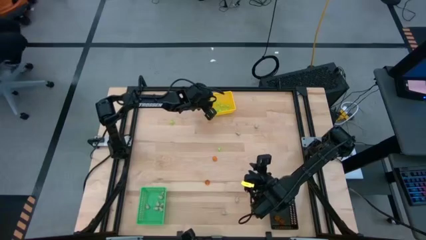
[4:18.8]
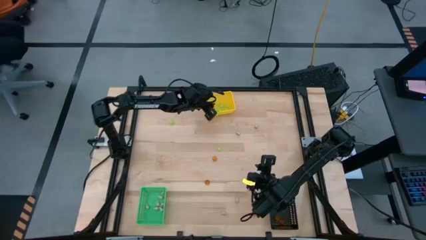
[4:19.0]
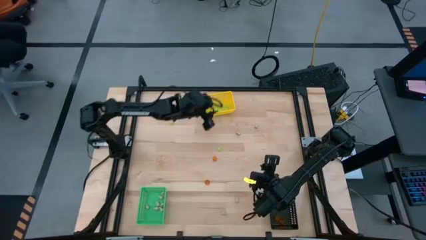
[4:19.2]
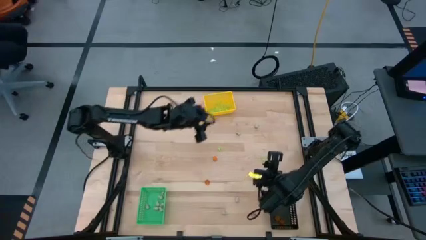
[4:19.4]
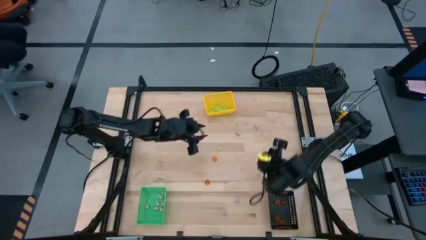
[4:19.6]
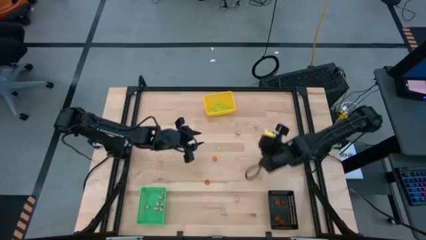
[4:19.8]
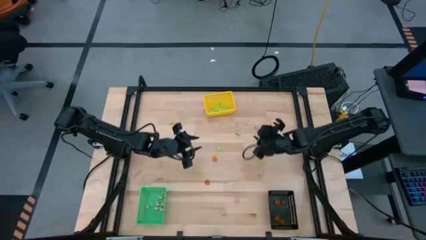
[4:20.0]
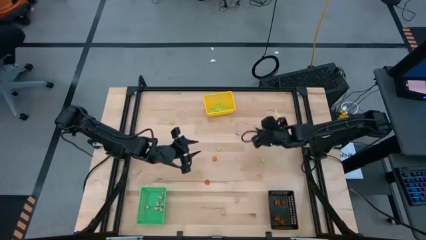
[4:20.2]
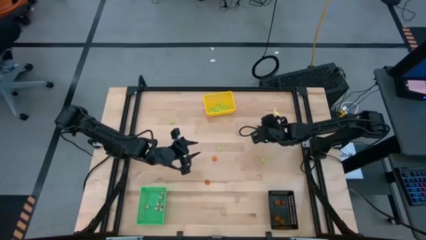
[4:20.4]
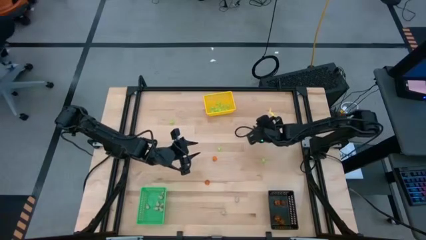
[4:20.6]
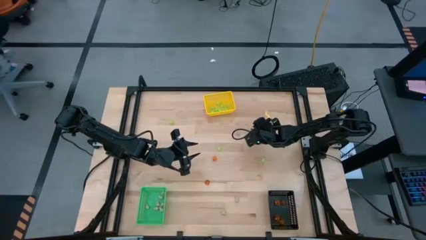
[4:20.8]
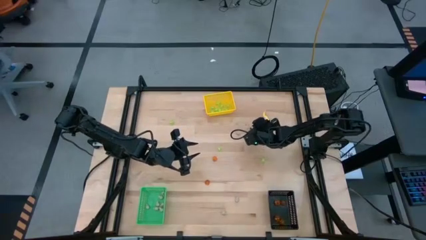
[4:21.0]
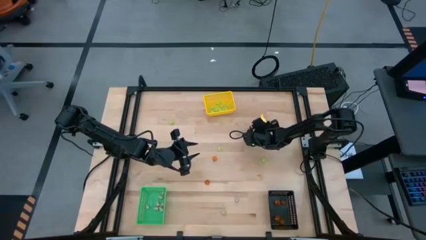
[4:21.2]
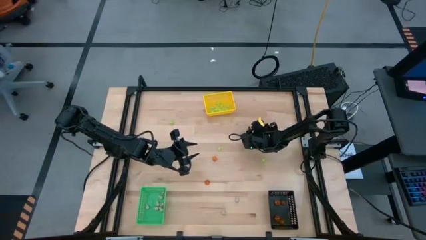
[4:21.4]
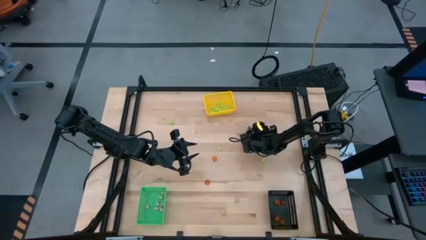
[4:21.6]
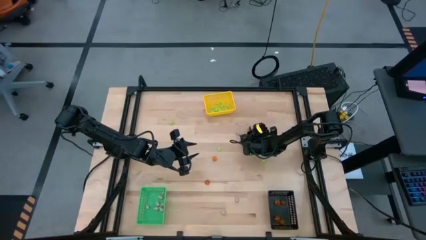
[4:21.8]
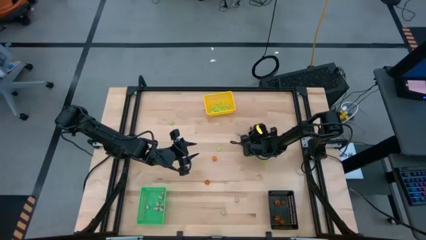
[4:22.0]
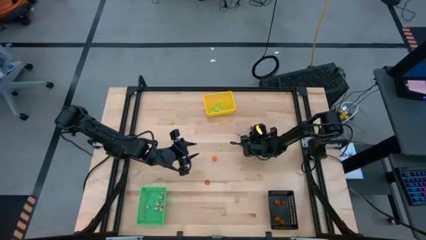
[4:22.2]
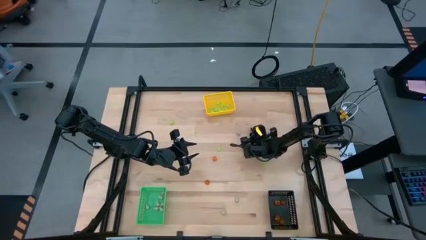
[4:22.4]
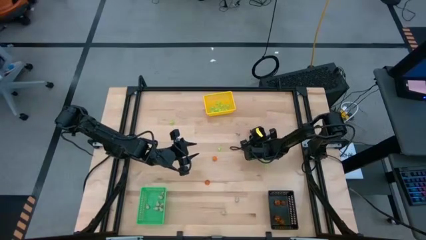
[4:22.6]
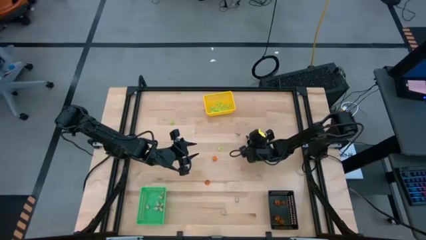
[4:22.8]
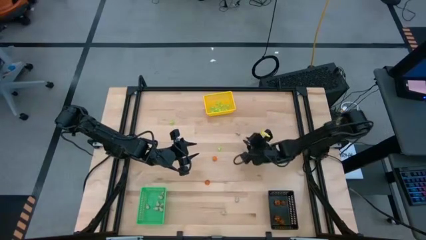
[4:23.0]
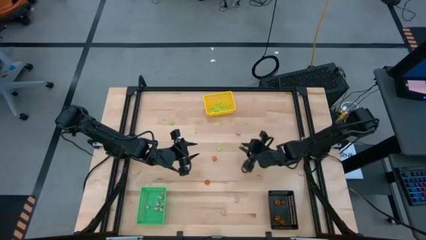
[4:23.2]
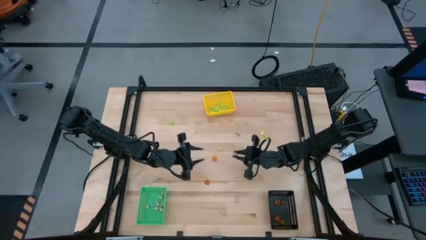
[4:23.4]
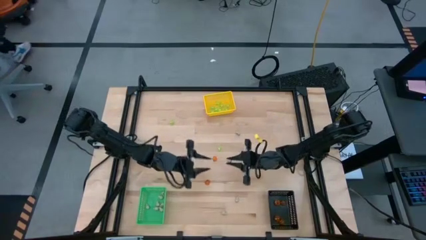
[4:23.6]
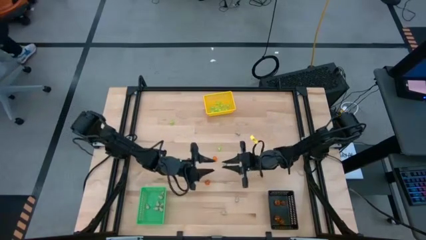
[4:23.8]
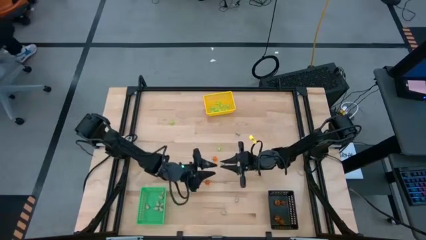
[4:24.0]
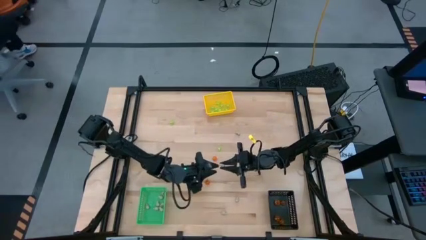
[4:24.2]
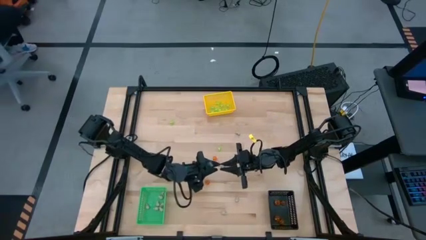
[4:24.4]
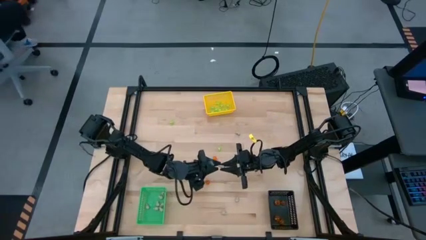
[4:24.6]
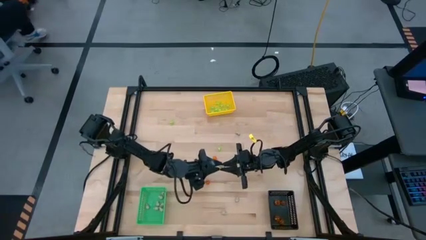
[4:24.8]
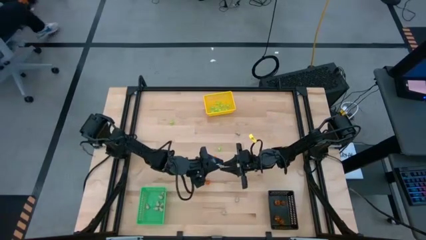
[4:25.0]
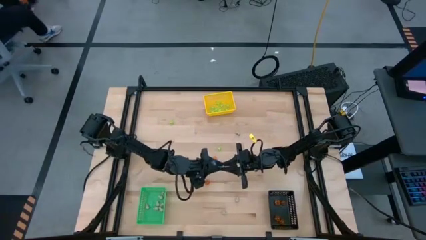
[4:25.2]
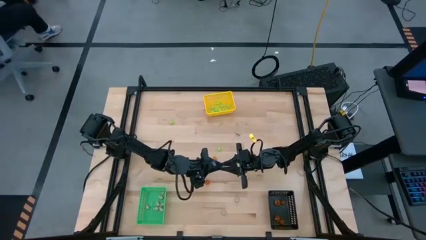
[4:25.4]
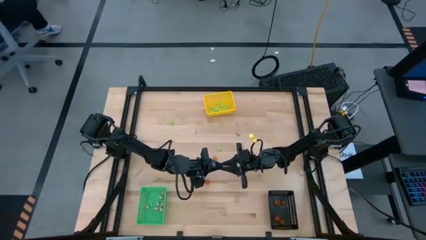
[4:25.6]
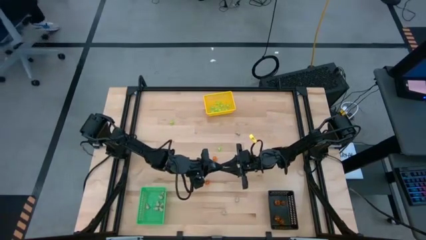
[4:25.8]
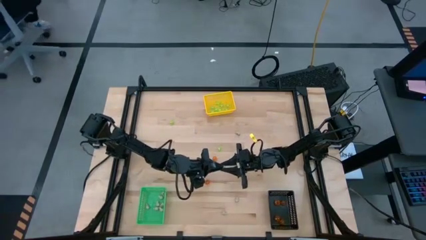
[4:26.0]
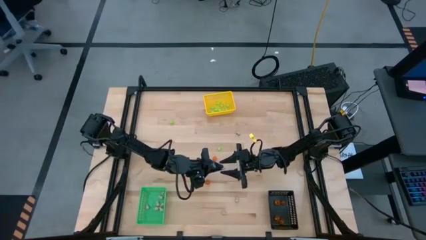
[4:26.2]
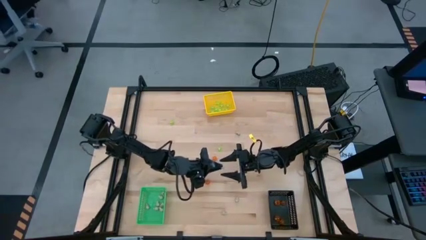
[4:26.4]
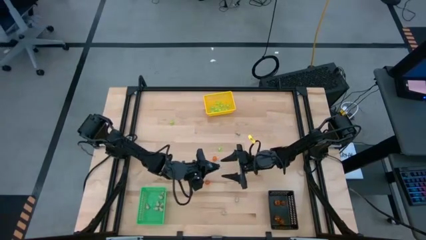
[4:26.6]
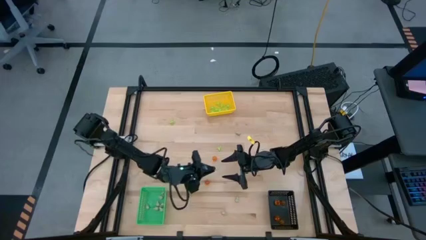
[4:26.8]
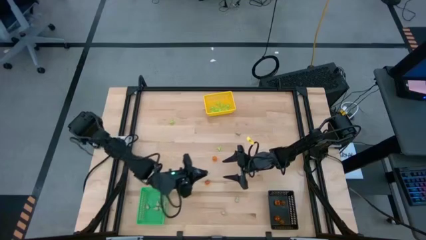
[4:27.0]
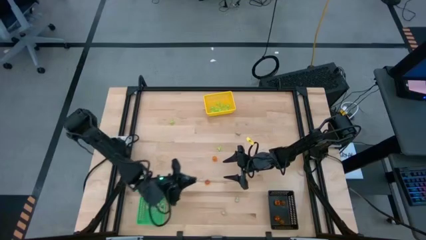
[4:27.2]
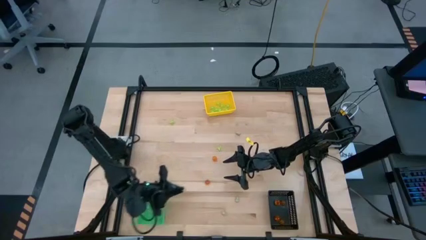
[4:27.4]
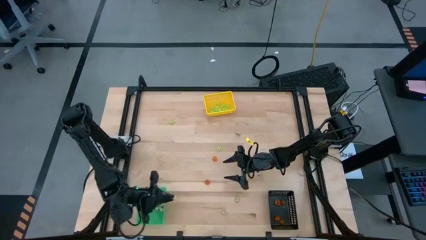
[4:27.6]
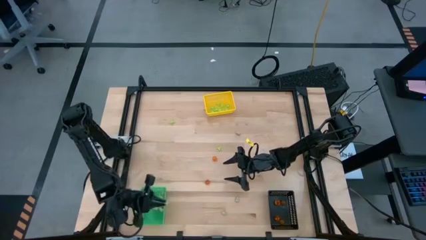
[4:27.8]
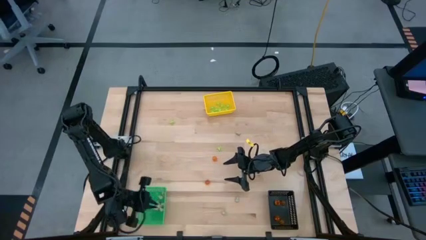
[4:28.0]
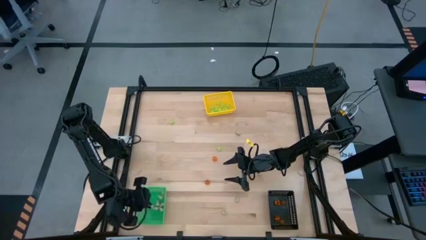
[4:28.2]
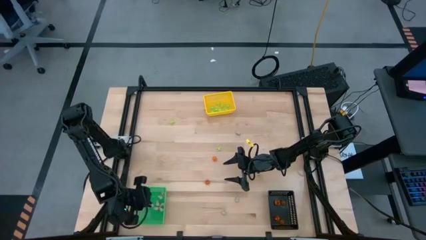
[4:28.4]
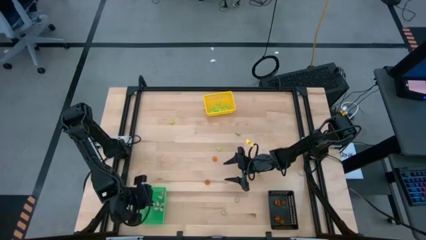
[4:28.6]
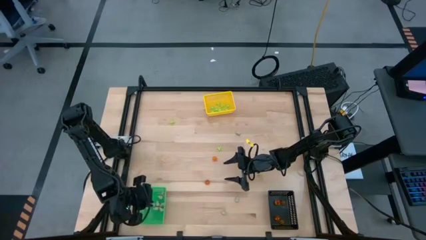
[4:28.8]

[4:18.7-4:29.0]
Task: Sort Halloween decoration
Put the white skull toy into the green bin

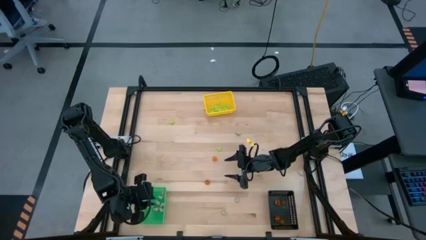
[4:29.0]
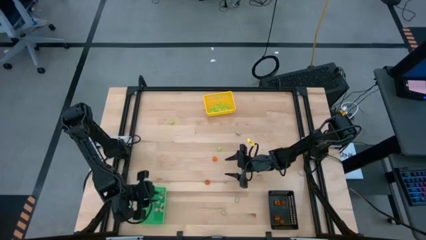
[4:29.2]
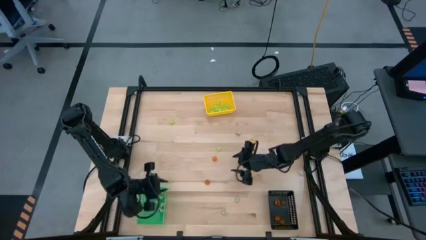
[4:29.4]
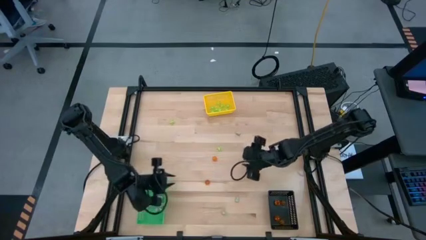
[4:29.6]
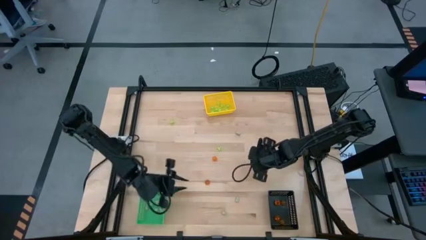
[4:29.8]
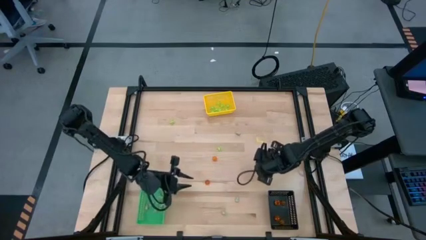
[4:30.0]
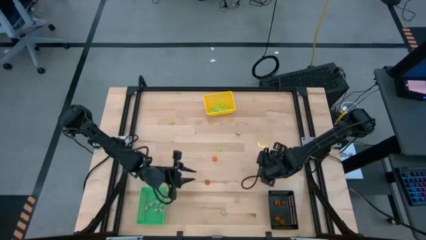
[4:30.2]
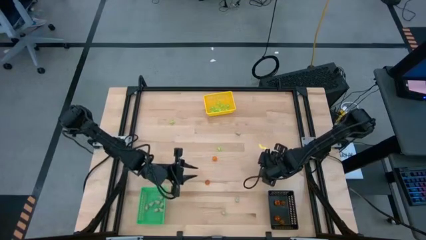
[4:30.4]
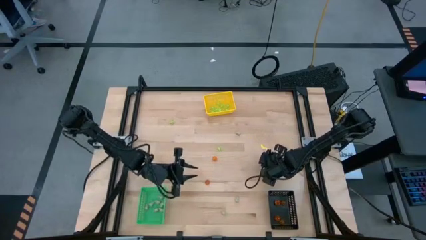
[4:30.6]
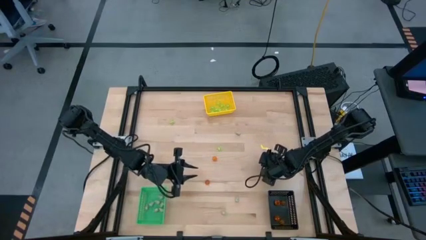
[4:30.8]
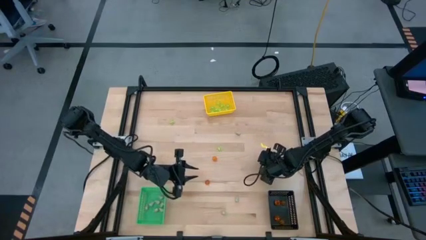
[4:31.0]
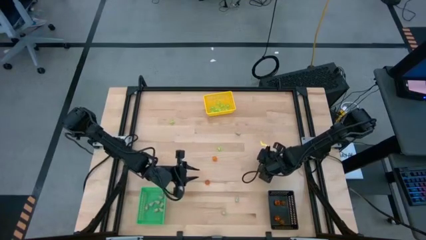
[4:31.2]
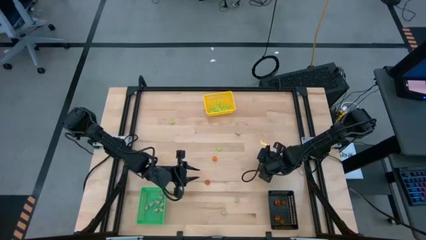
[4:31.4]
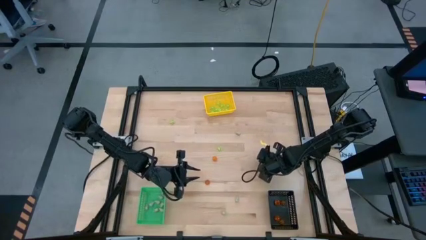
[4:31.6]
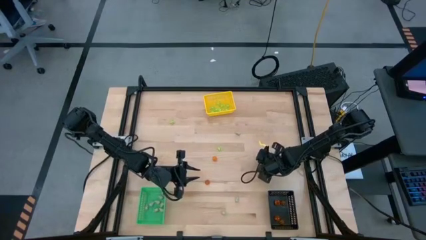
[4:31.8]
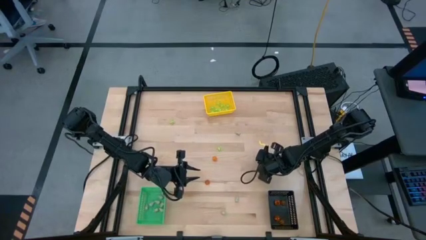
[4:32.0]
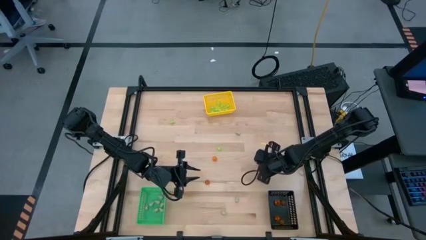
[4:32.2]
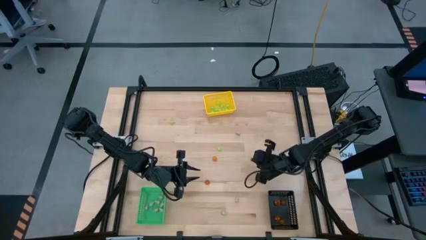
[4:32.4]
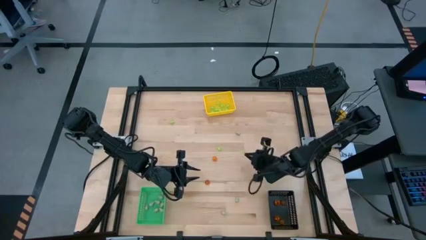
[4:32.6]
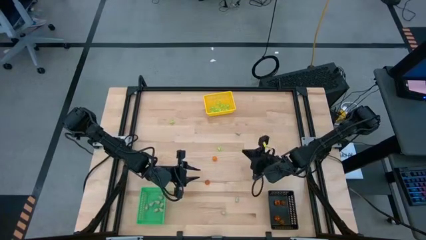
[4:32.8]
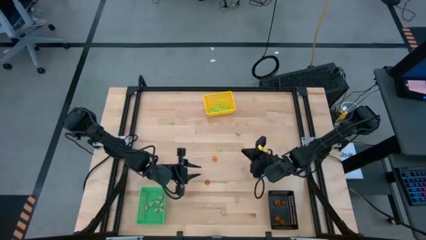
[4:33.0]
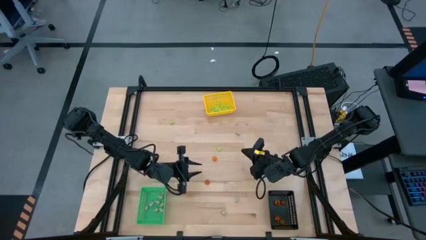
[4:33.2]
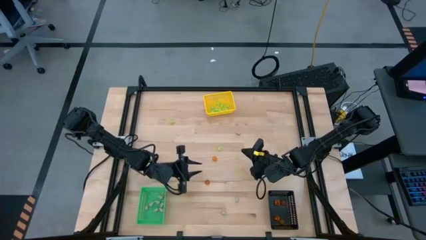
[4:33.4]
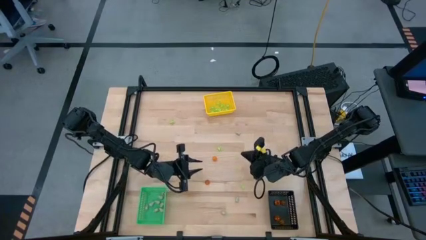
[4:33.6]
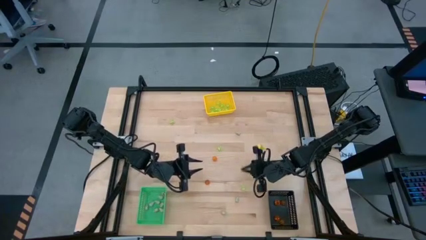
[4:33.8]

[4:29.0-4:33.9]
Put the green spider toy into the yellow bin
